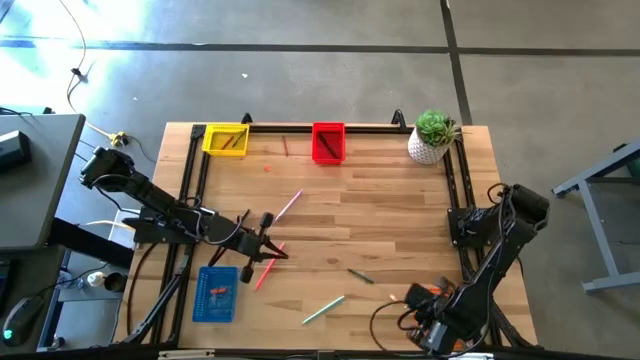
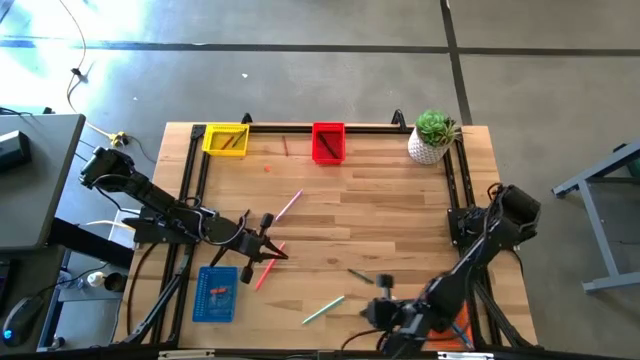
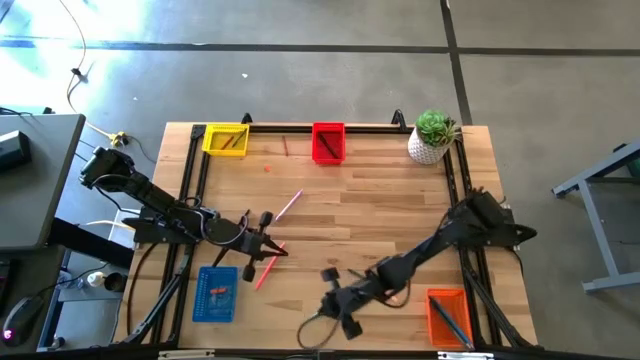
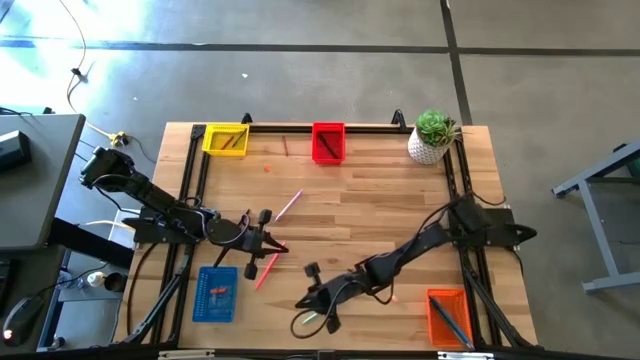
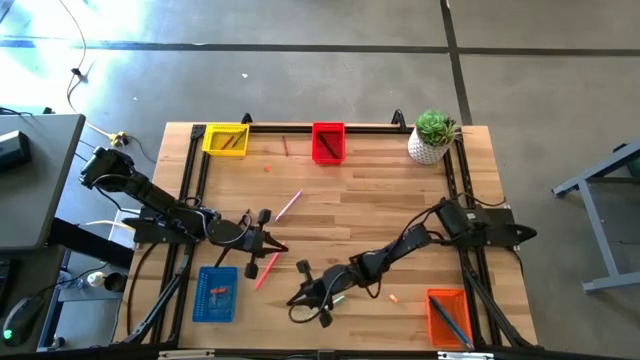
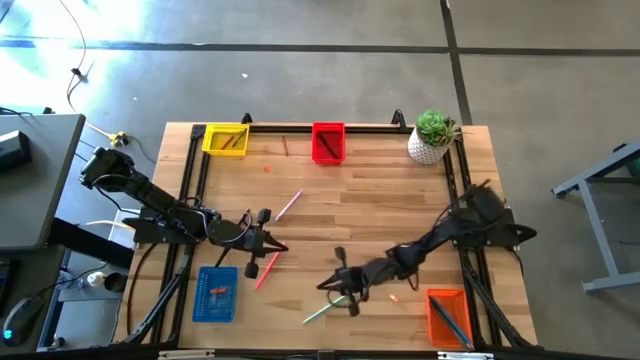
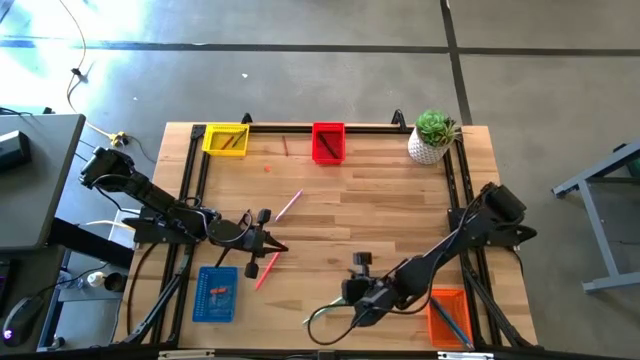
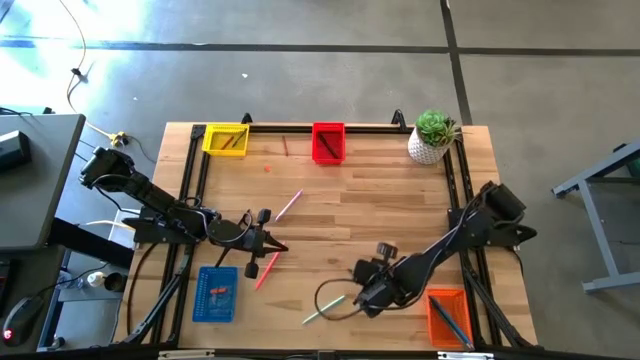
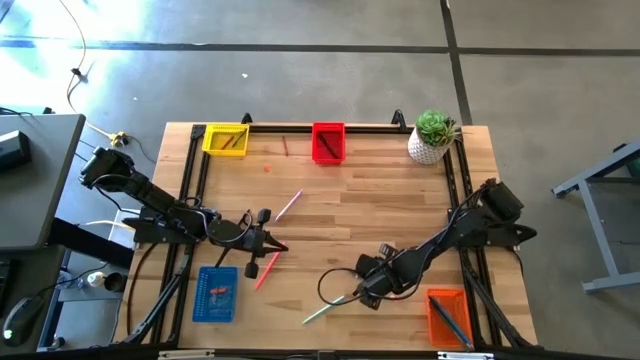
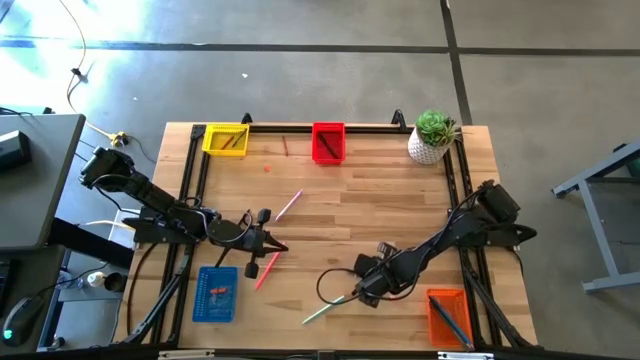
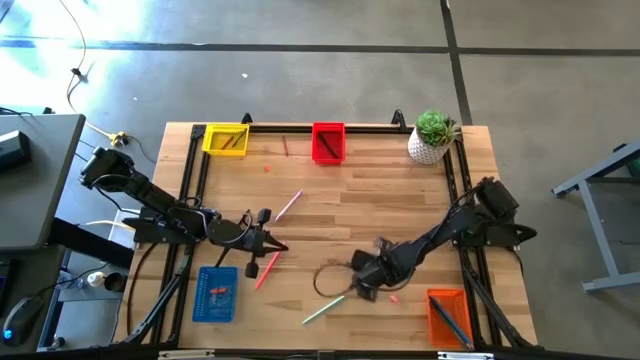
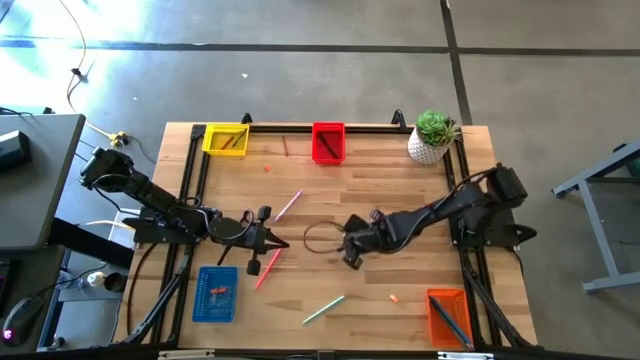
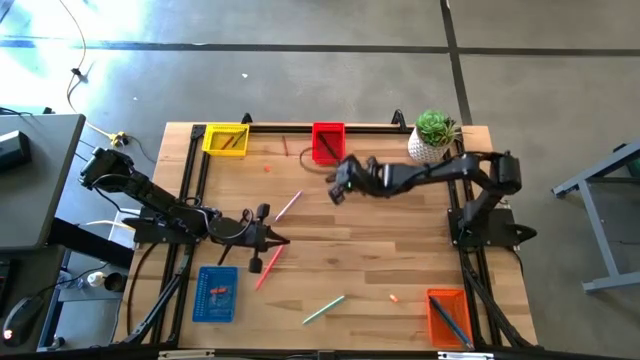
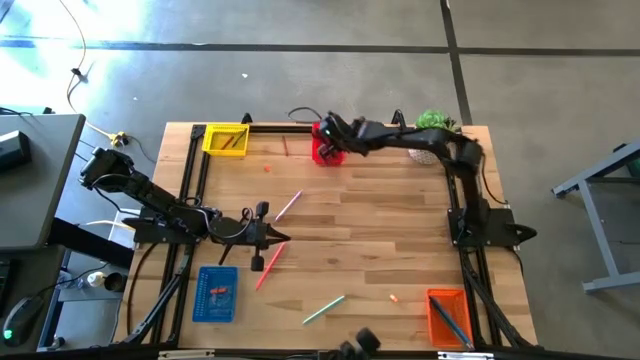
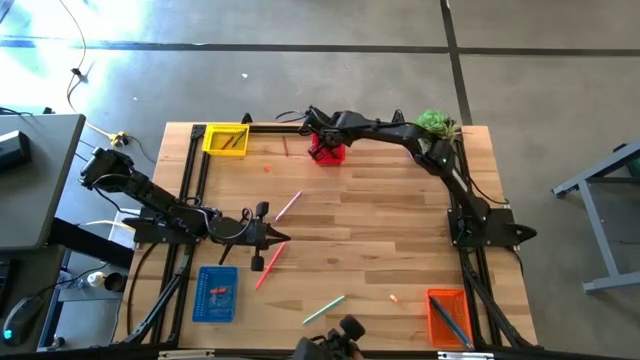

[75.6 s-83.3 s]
Task: Sort crayons/erasers/pens/pencils in bins
Put the green crayon into the red bin

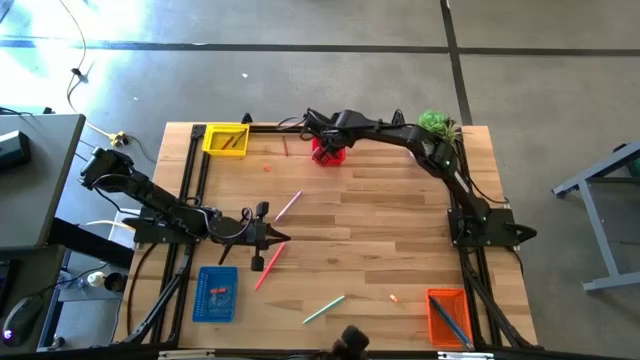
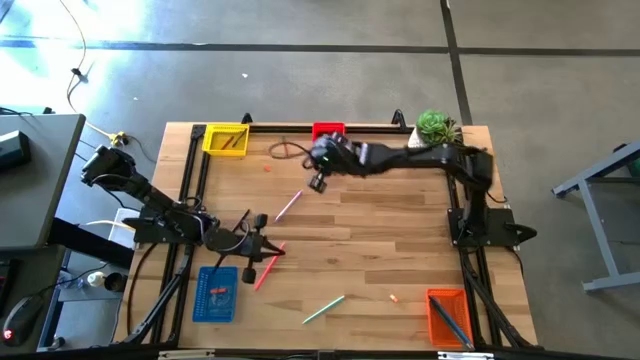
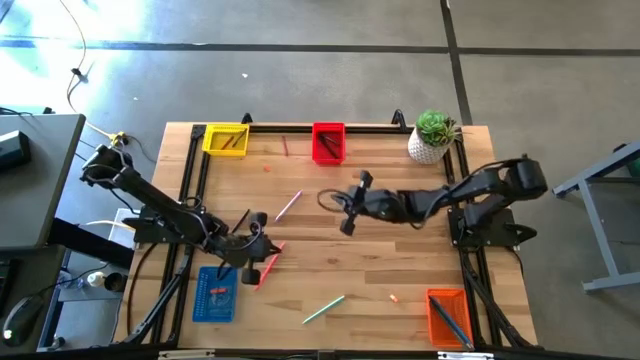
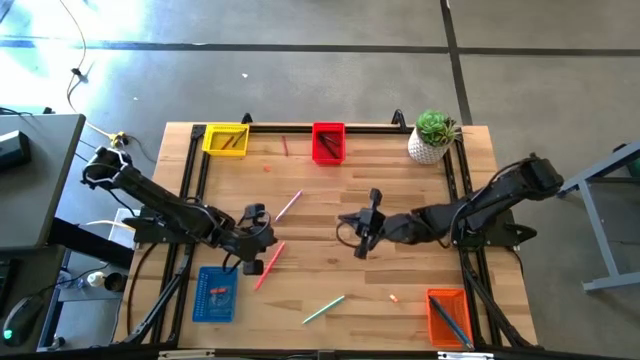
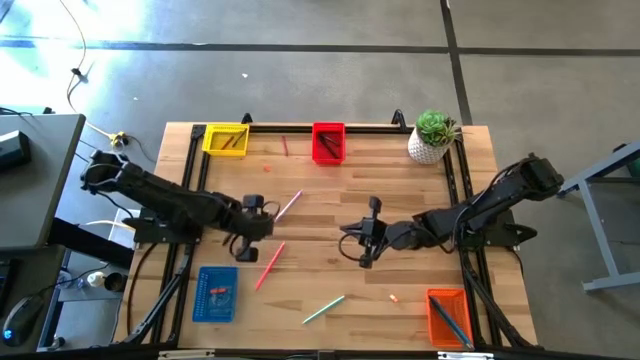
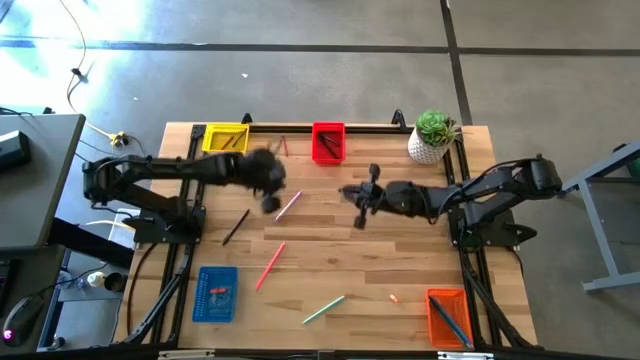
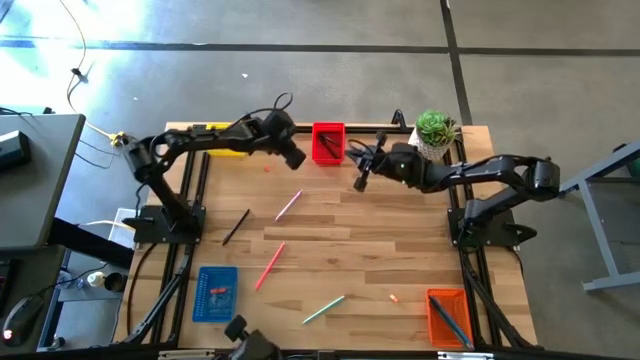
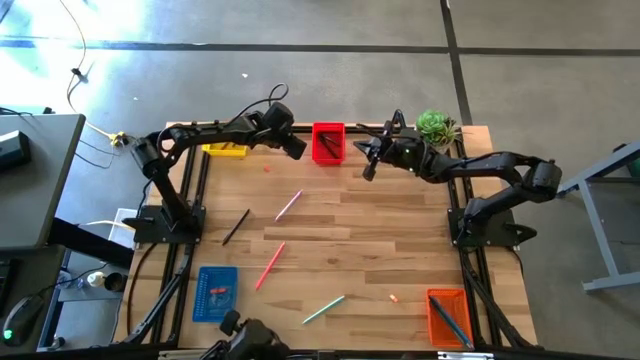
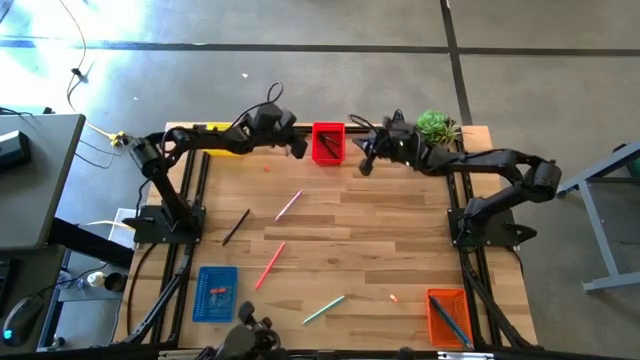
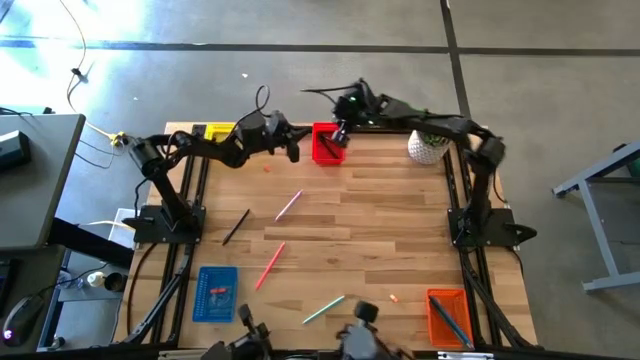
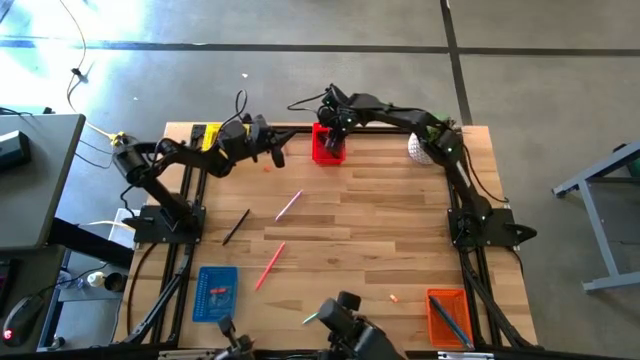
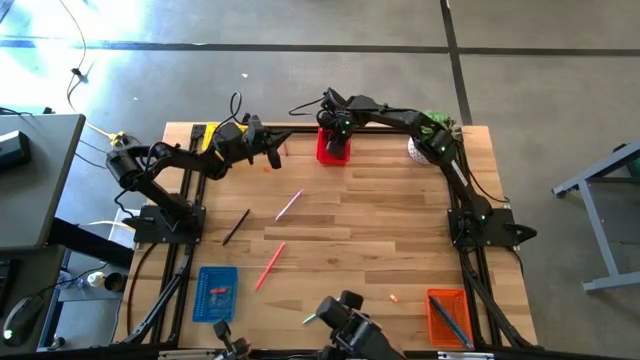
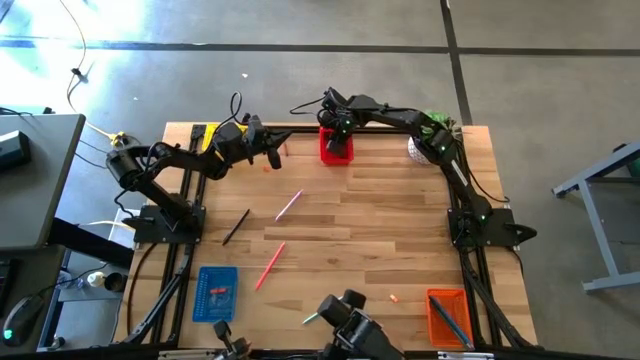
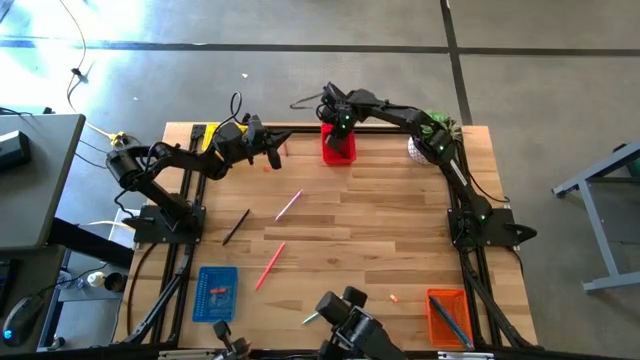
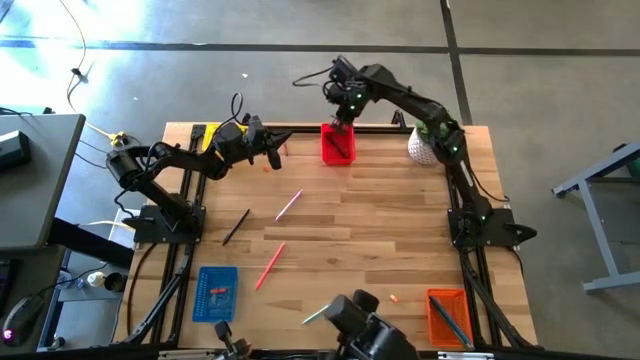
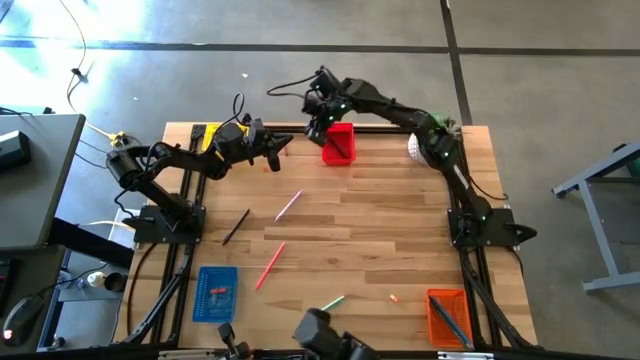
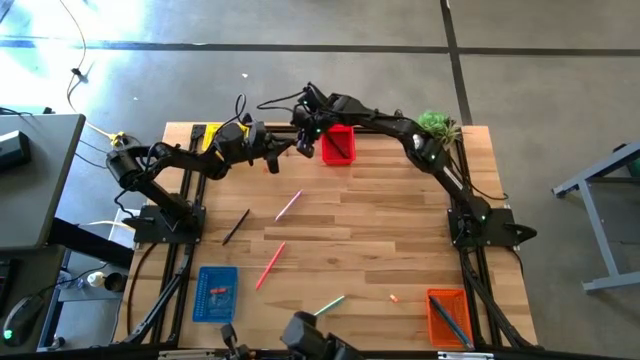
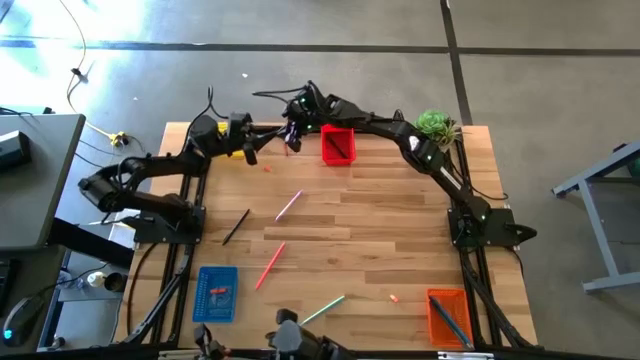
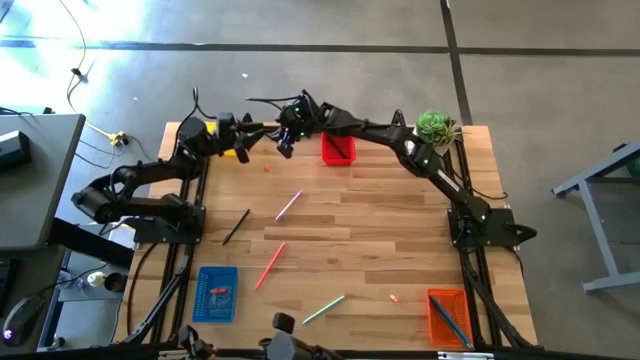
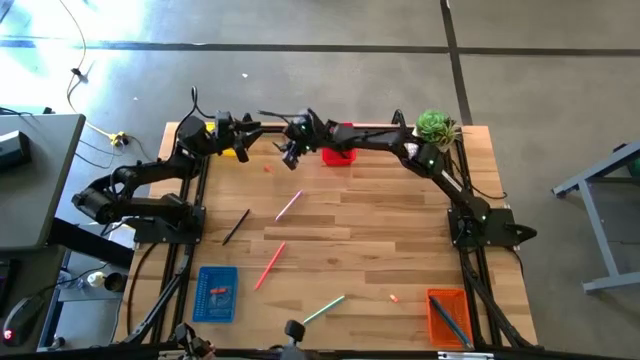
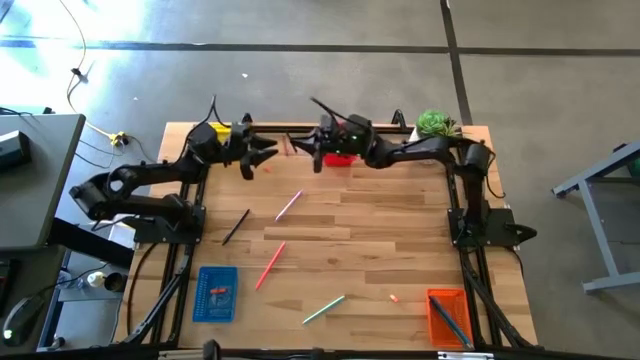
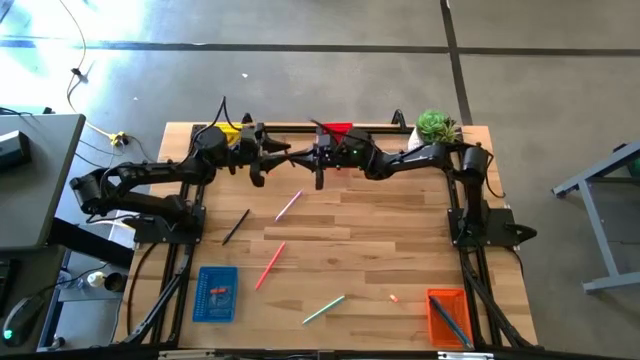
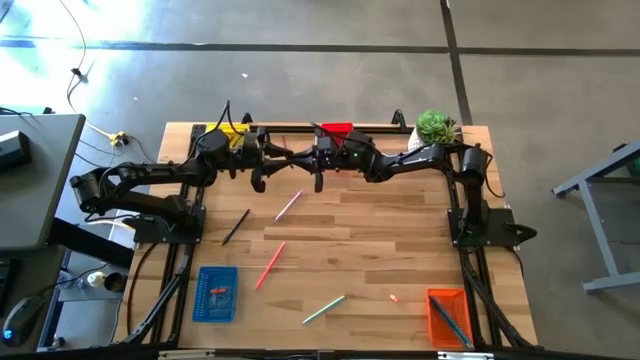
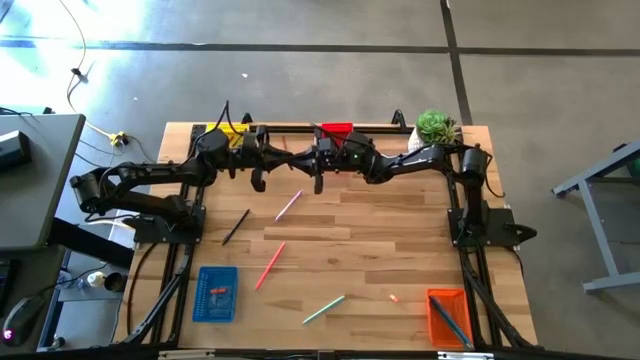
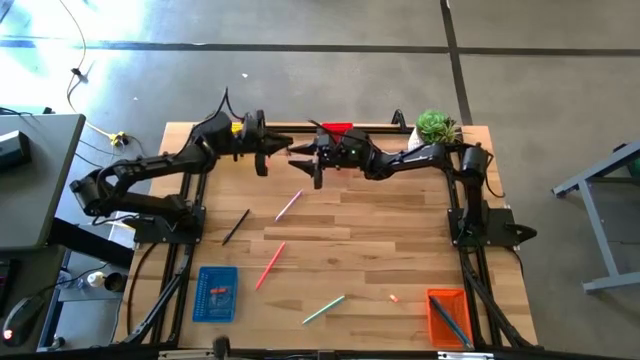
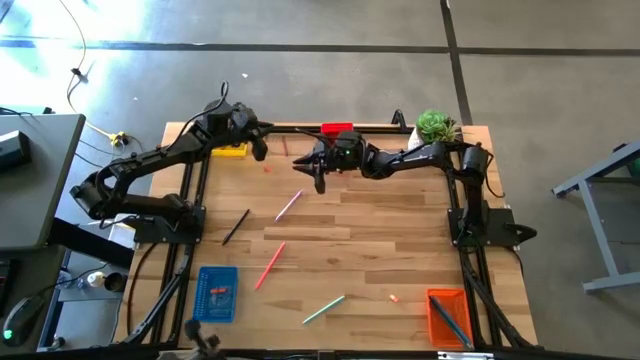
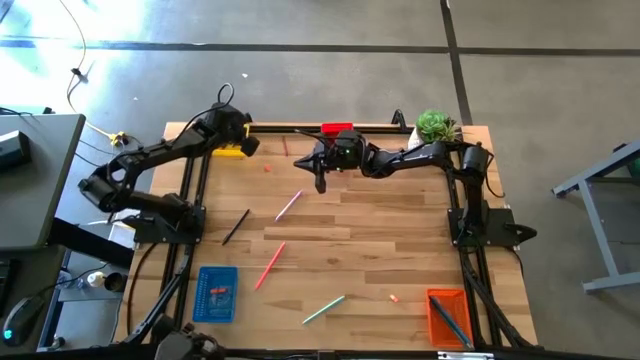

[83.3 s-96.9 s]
Put the green crayon from the red bin into the yellow bin
